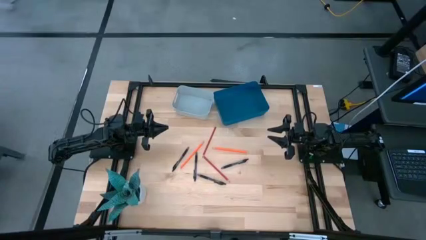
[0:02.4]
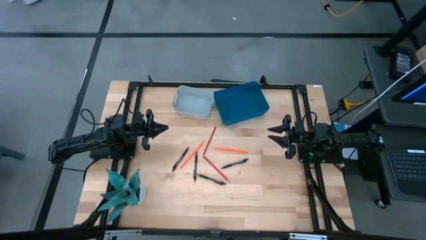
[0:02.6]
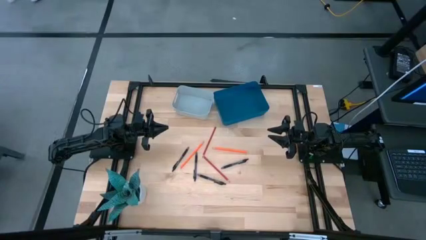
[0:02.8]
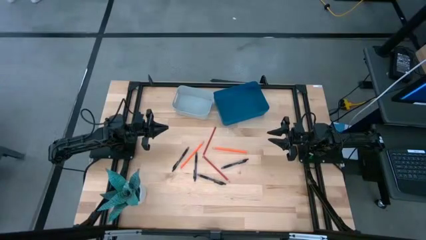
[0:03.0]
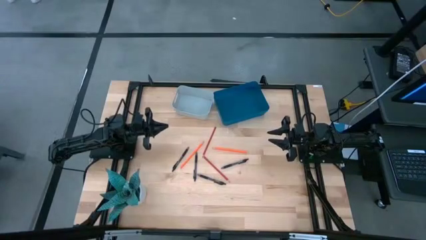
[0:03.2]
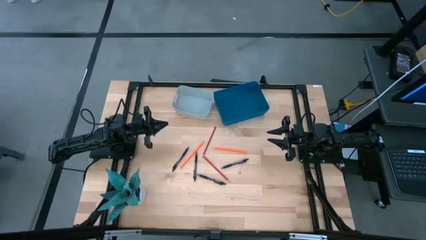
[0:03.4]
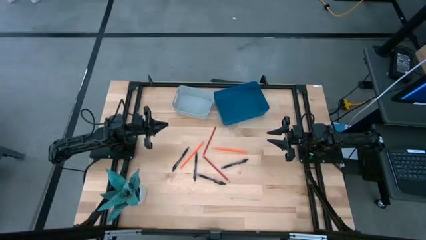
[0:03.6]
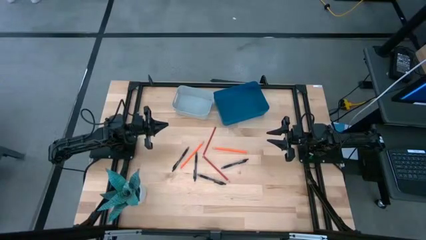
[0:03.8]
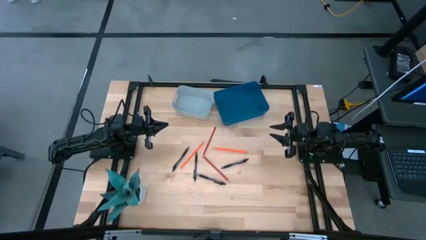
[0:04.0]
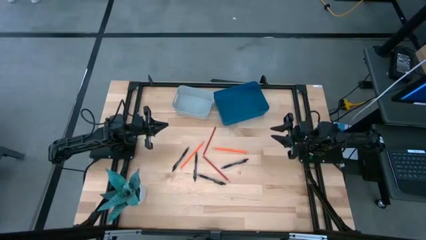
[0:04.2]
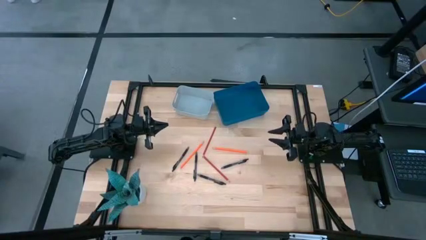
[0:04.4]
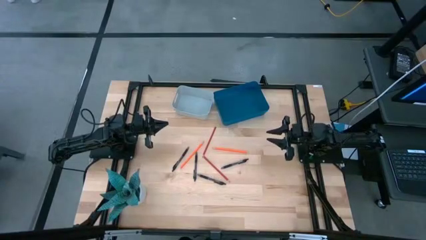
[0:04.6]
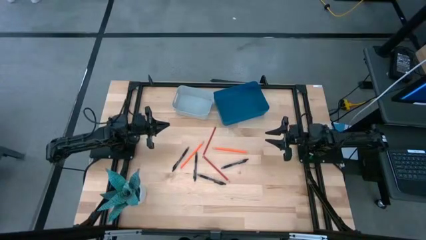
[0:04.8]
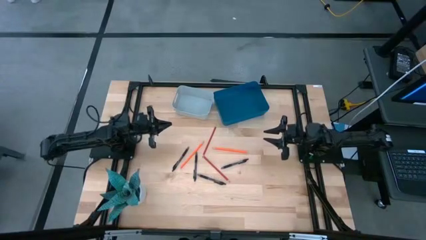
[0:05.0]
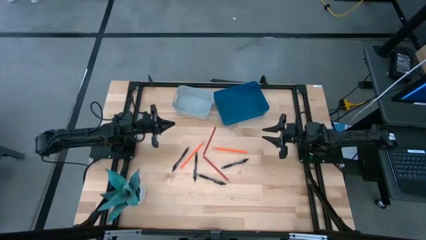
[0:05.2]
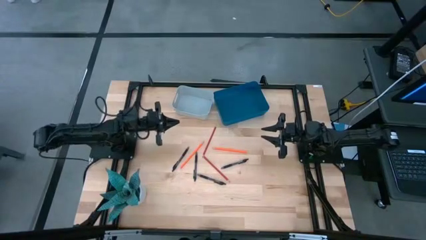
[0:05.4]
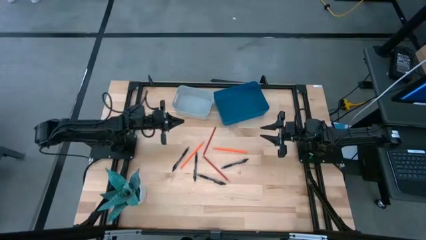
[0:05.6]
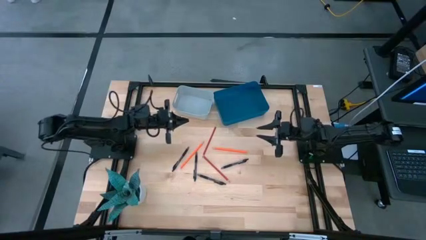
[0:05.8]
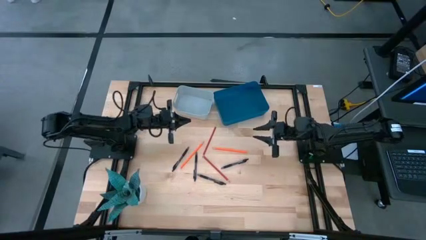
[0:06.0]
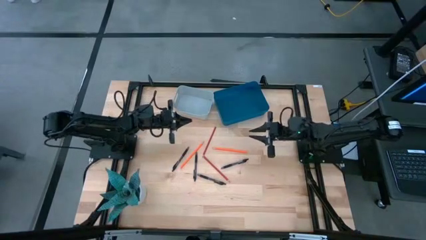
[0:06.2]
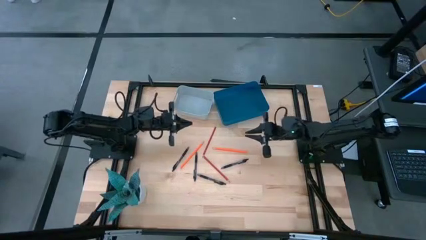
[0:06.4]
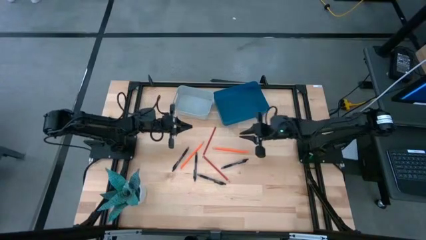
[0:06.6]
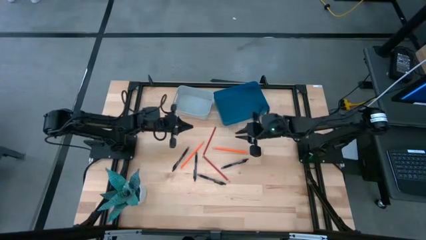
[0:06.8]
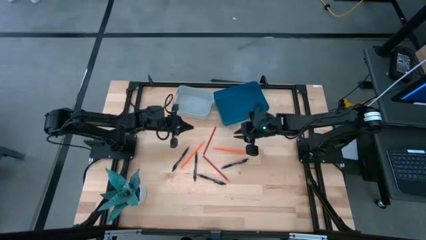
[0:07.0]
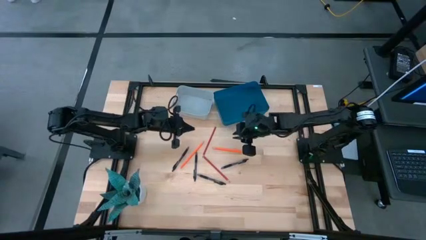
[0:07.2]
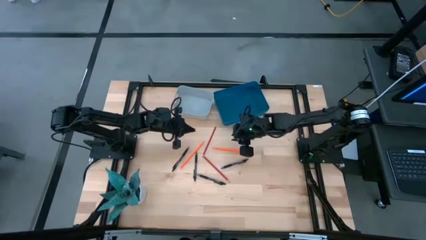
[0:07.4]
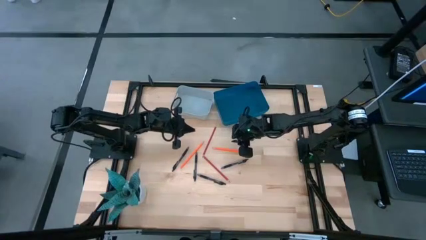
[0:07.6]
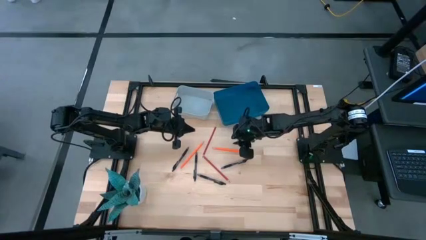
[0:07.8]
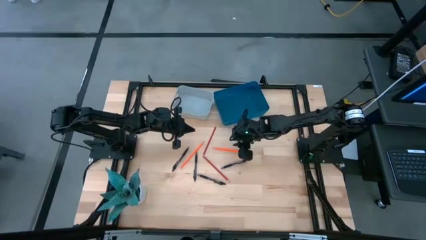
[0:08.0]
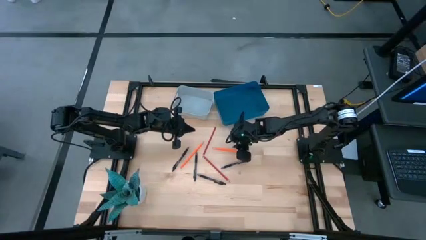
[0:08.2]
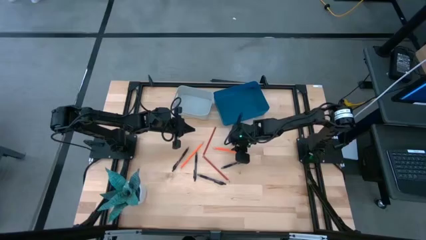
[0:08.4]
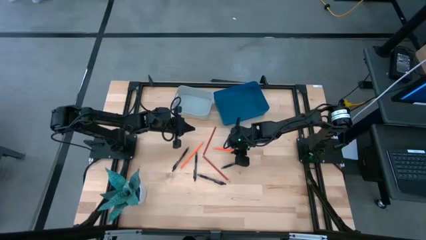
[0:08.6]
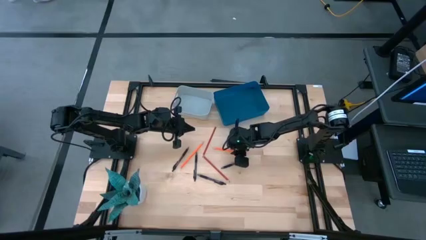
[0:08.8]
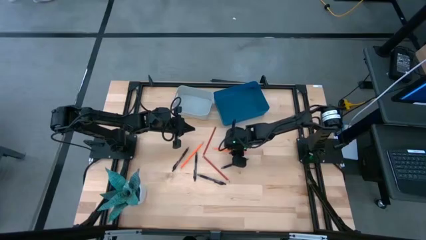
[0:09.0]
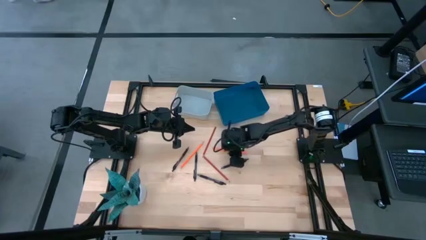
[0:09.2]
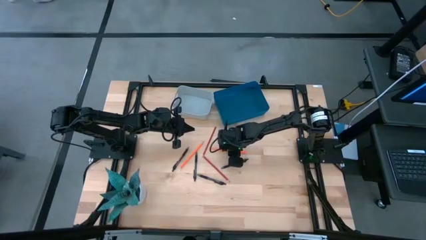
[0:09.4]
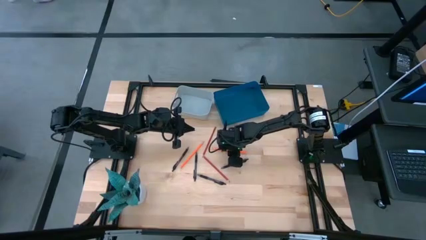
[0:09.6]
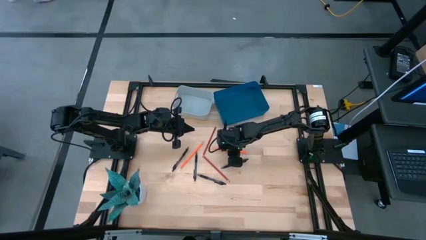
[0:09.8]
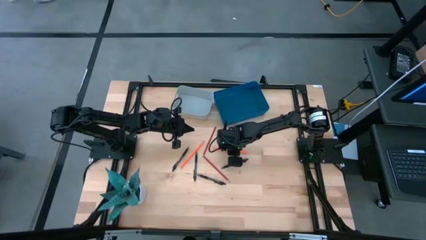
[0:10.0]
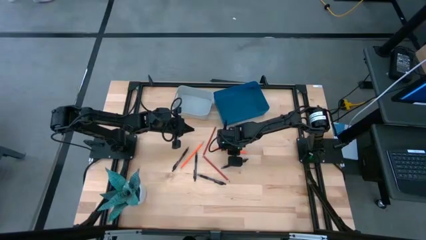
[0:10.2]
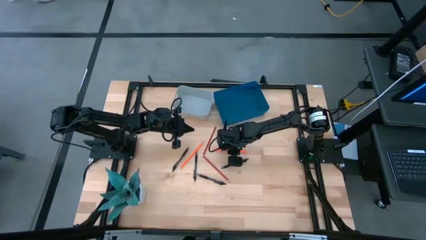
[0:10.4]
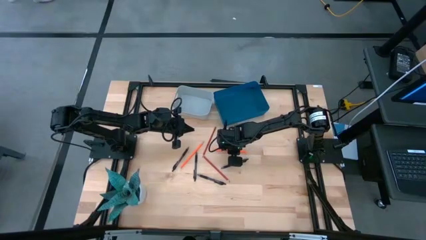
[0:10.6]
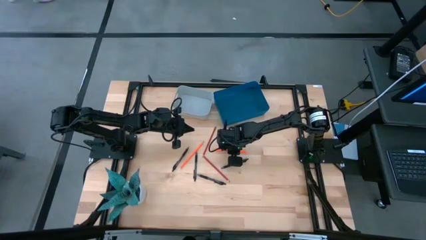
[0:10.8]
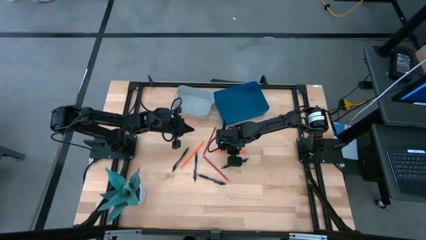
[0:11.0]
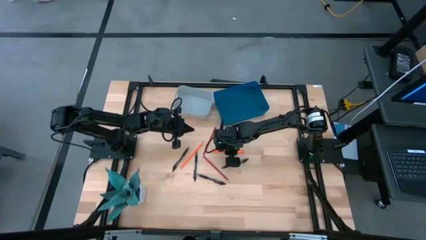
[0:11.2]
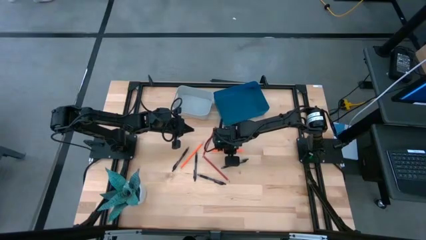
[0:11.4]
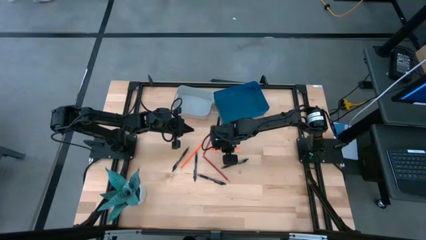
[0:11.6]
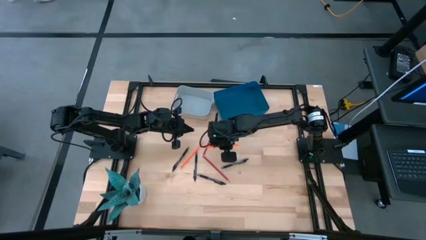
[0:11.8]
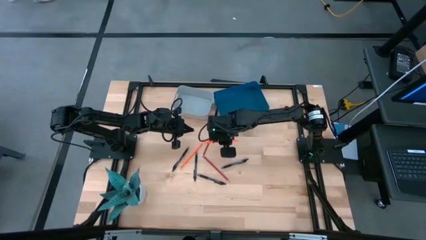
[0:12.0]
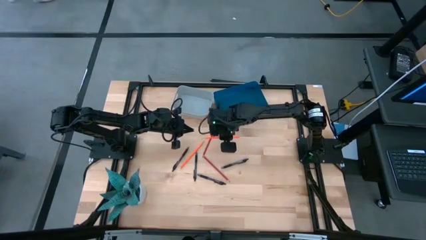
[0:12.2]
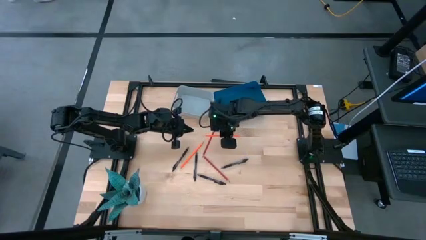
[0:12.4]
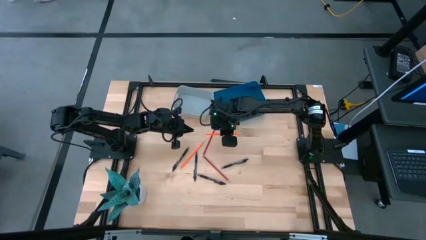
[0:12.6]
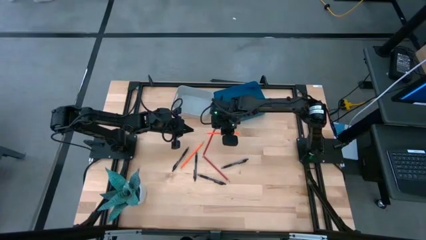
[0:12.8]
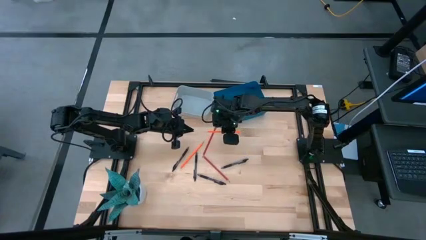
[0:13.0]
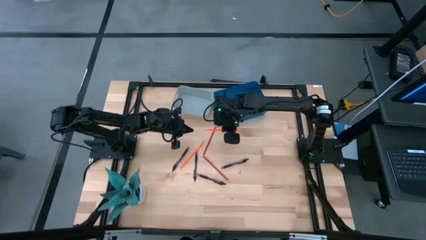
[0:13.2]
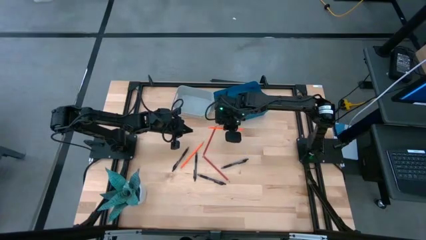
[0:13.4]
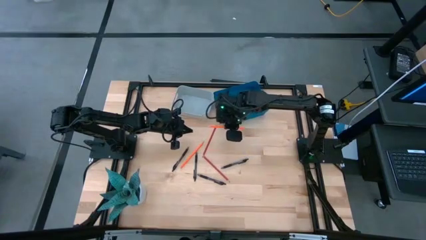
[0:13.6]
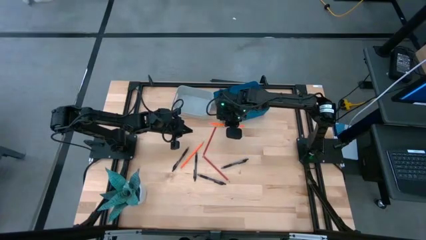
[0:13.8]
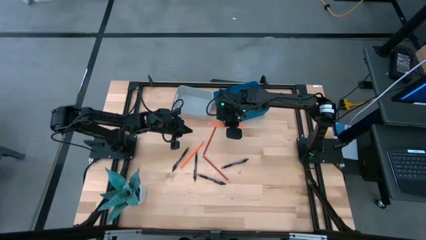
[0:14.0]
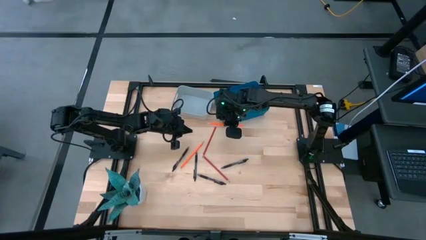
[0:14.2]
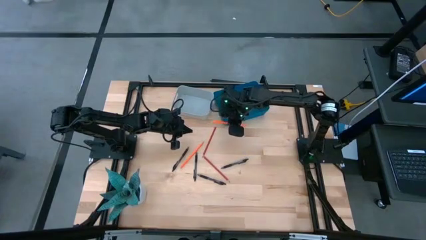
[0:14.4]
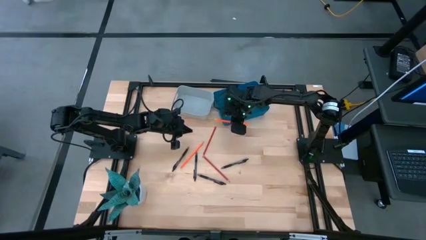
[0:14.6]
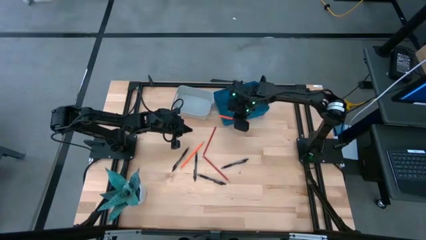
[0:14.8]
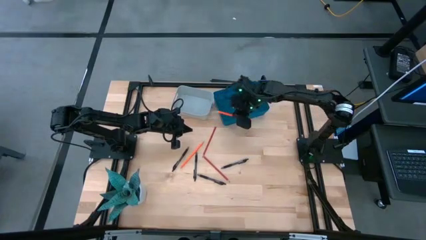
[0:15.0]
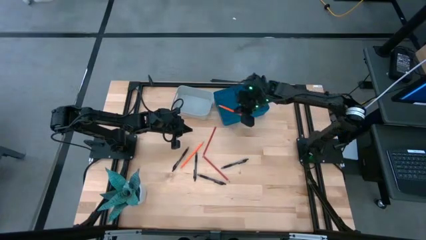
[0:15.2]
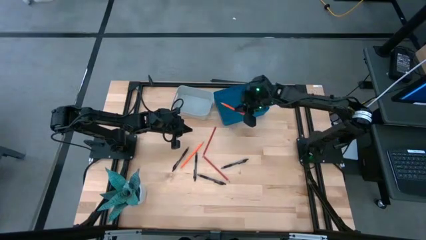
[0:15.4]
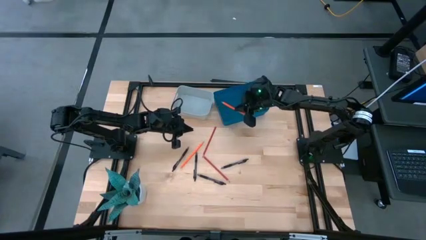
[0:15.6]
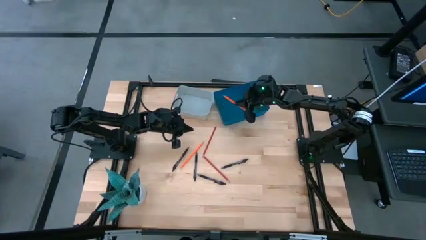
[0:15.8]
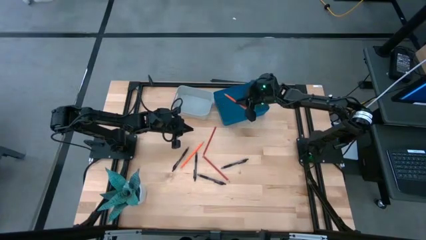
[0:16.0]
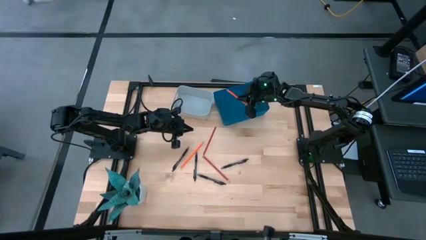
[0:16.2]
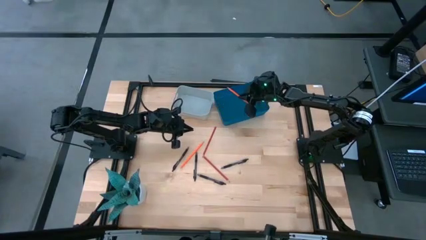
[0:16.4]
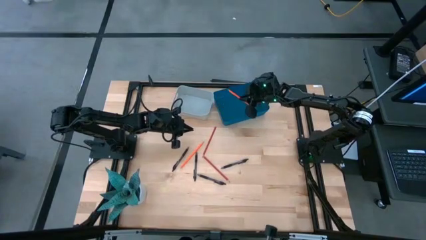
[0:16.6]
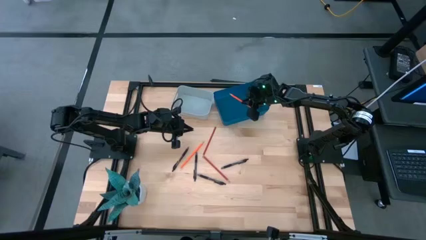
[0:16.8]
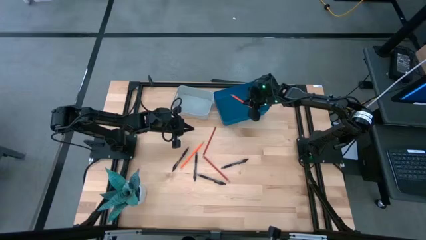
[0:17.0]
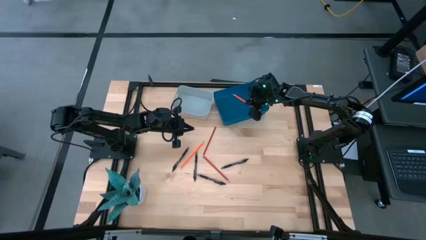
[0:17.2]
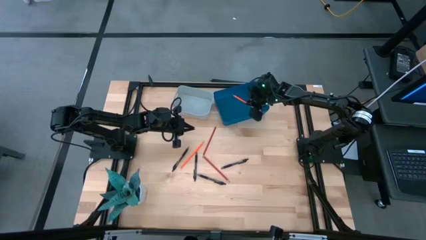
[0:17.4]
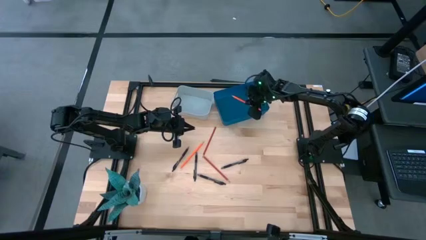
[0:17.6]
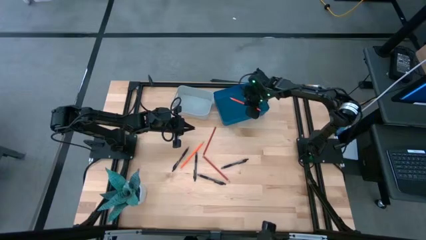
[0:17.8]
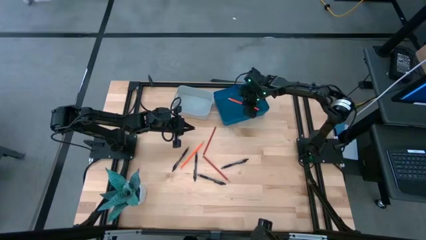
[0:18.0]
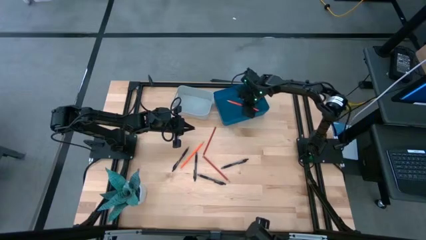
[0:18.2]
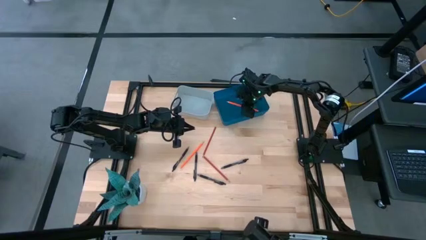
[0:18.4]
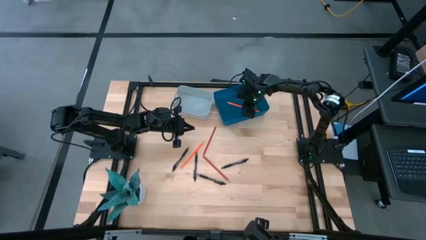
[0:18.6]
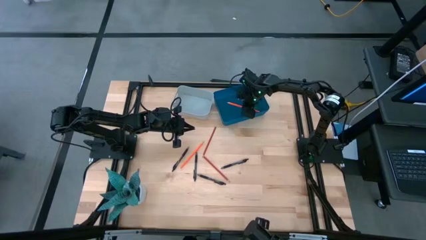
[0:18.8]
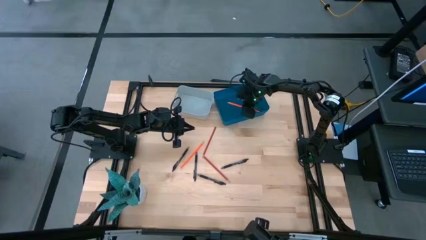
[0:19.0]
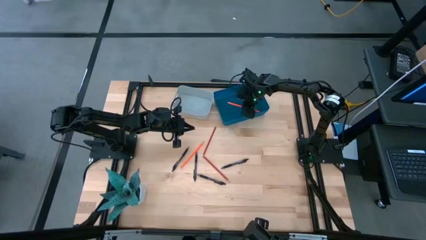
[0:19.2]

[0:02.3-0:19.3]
Task: Sort pens & pencils
Put the orange pencil into the blue bin
